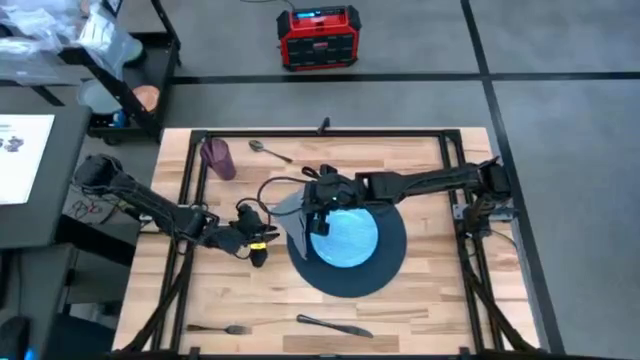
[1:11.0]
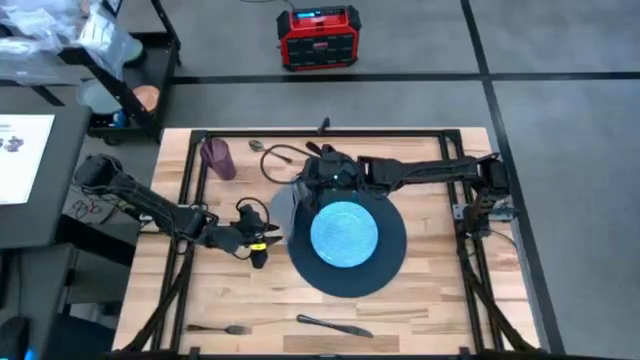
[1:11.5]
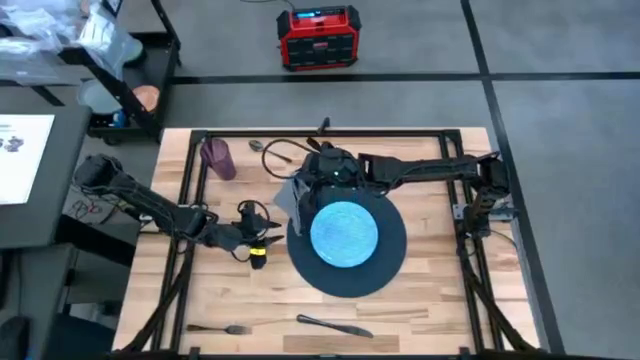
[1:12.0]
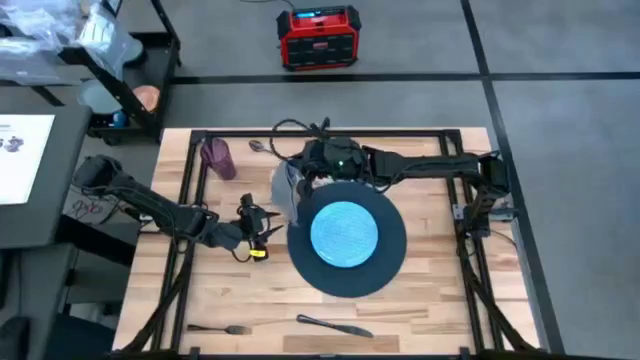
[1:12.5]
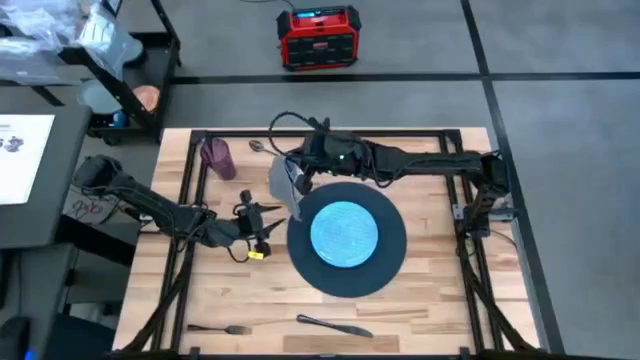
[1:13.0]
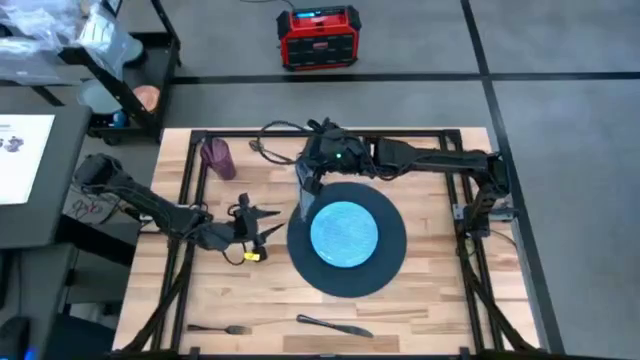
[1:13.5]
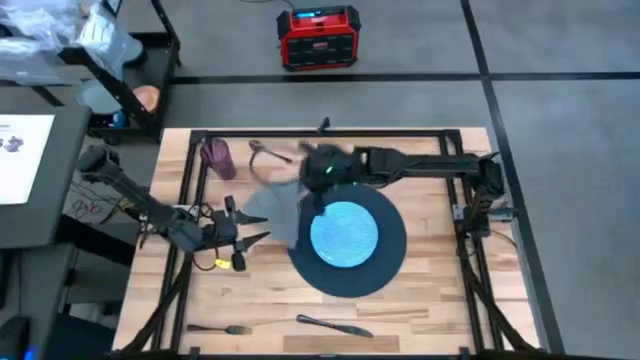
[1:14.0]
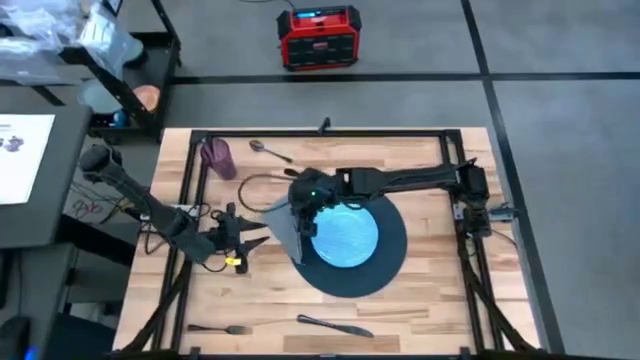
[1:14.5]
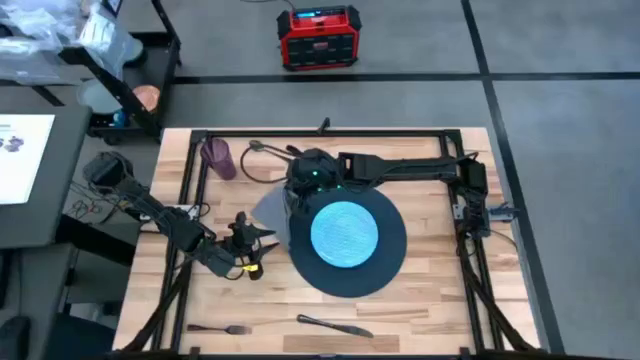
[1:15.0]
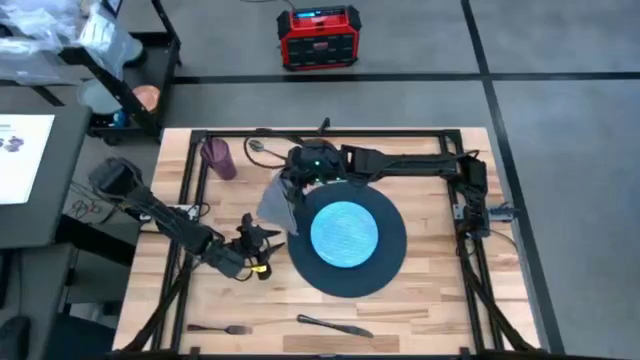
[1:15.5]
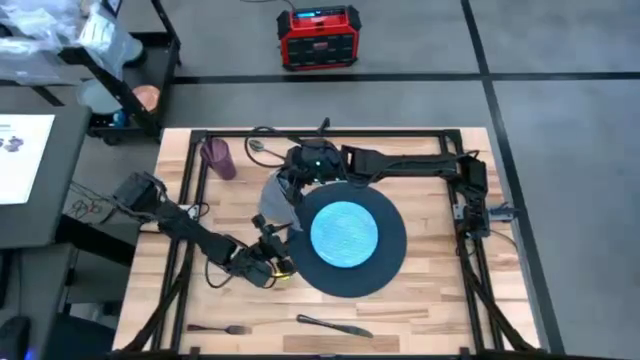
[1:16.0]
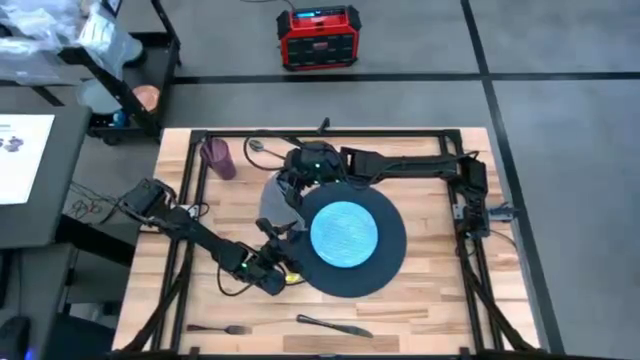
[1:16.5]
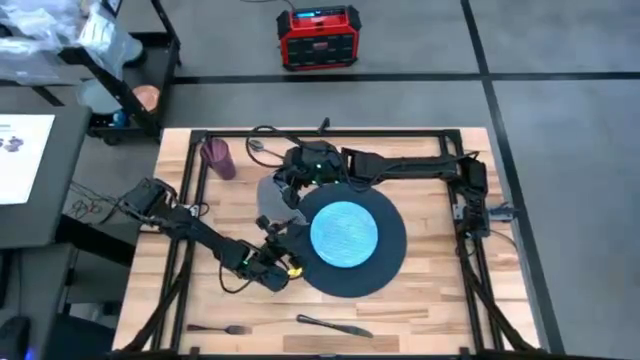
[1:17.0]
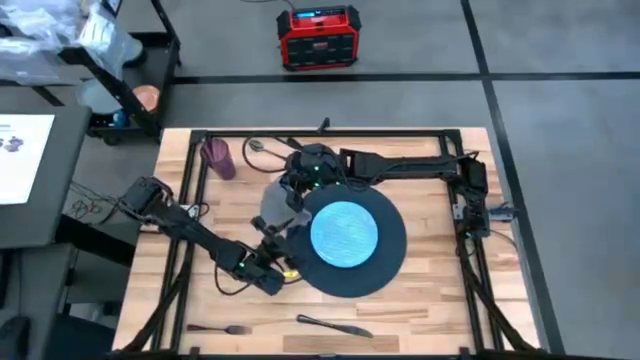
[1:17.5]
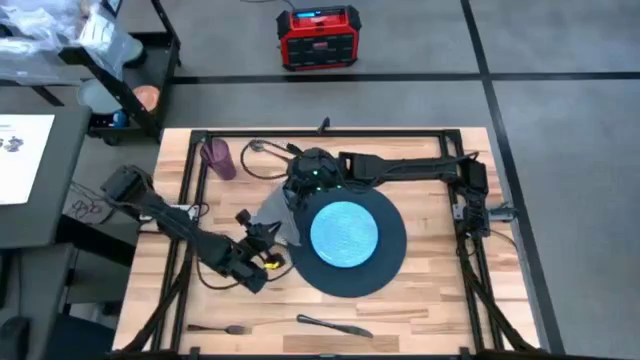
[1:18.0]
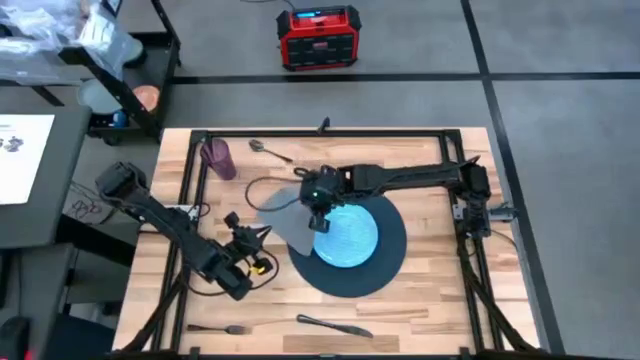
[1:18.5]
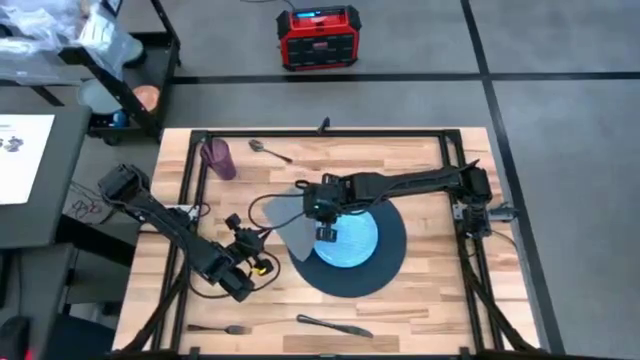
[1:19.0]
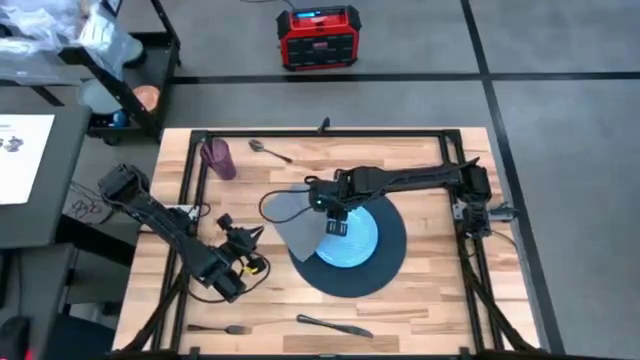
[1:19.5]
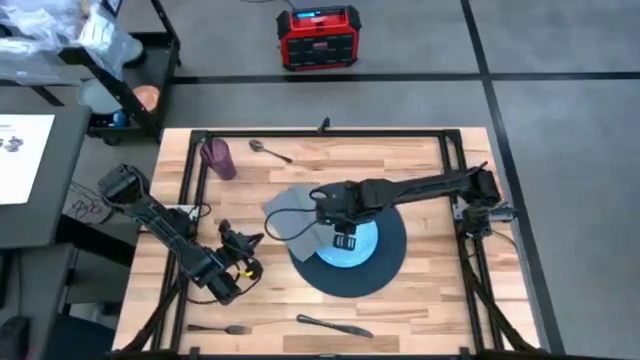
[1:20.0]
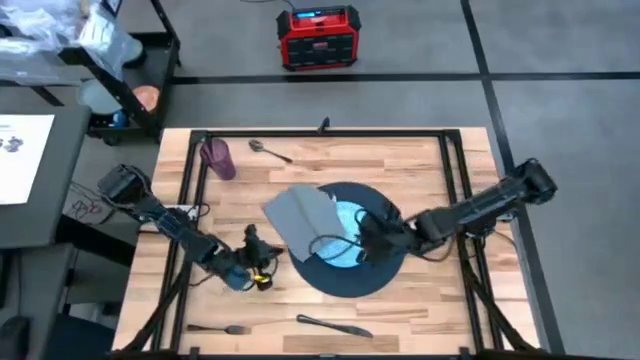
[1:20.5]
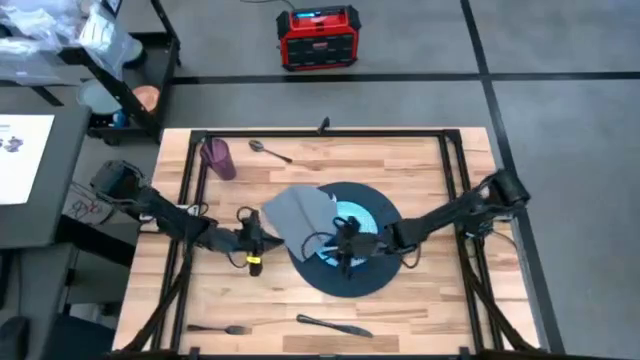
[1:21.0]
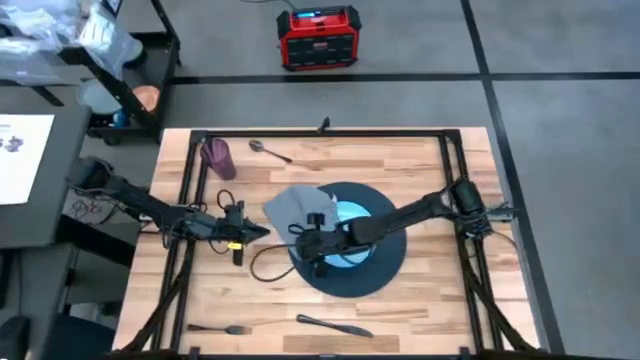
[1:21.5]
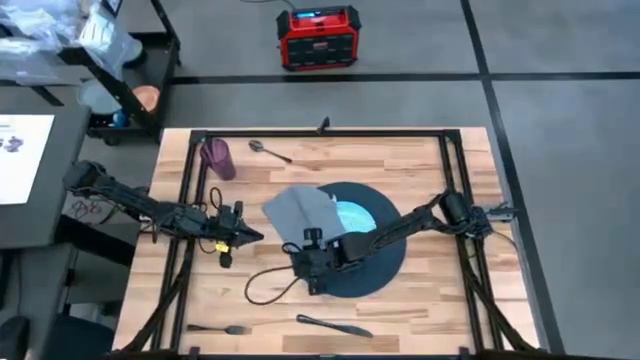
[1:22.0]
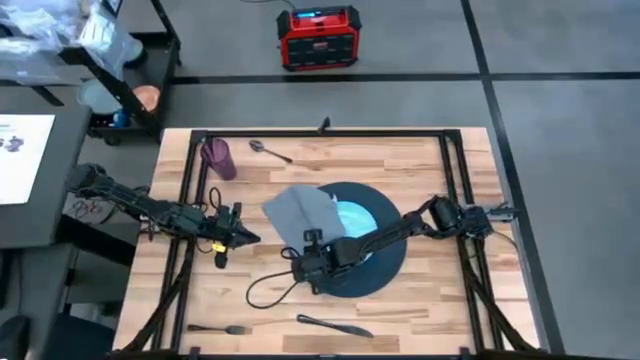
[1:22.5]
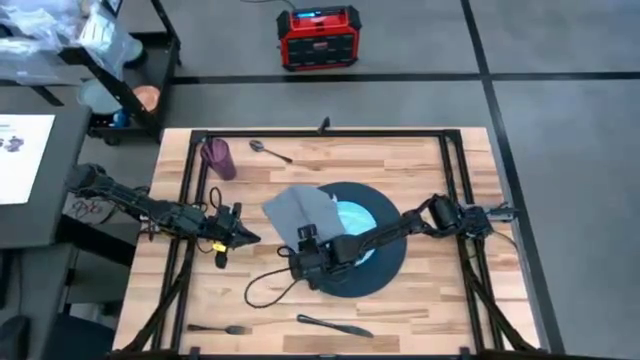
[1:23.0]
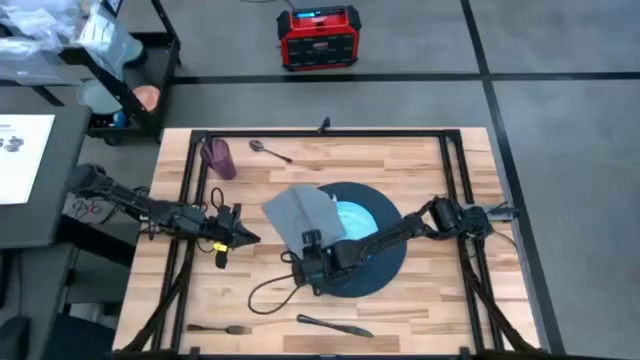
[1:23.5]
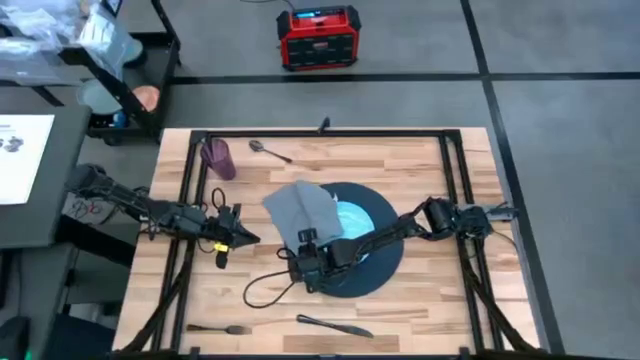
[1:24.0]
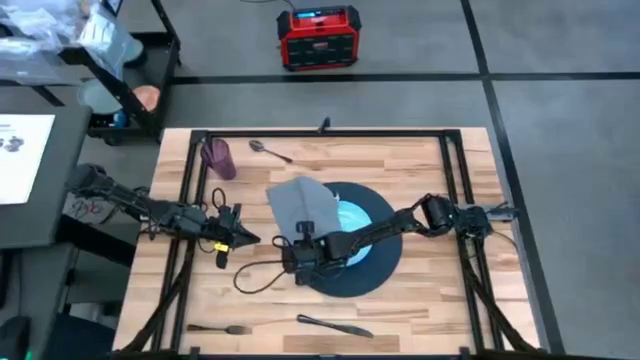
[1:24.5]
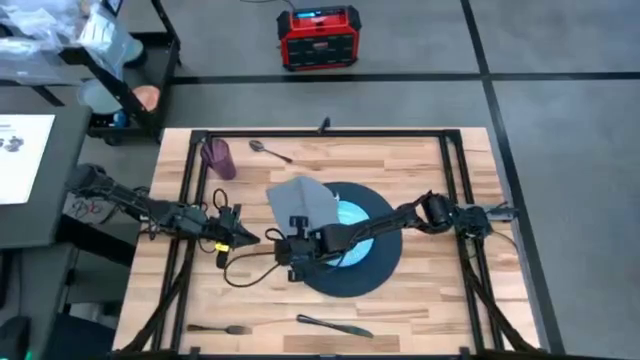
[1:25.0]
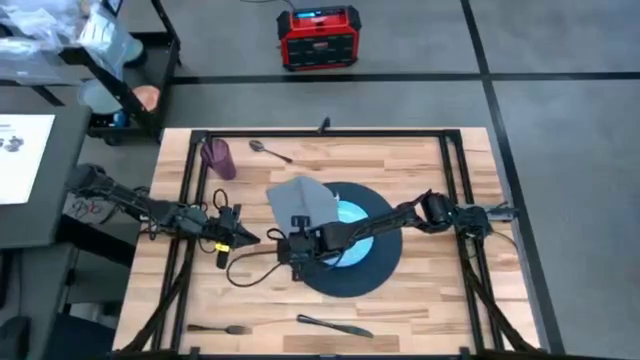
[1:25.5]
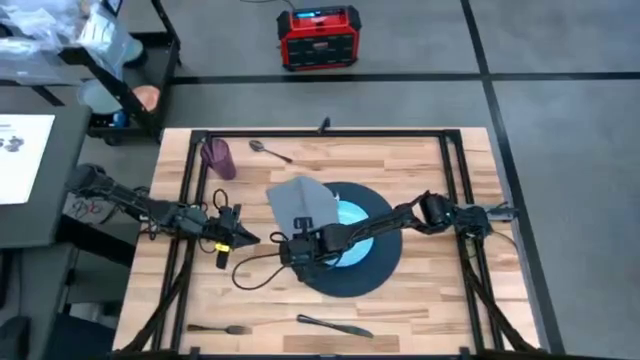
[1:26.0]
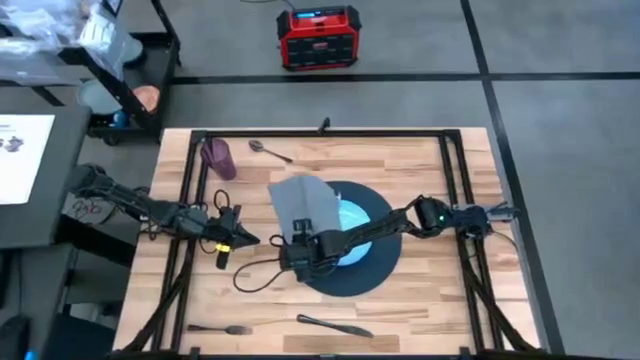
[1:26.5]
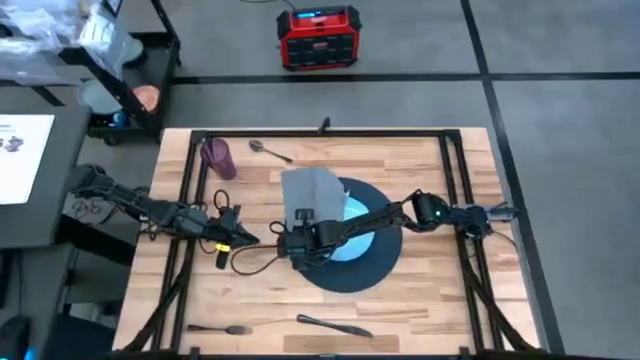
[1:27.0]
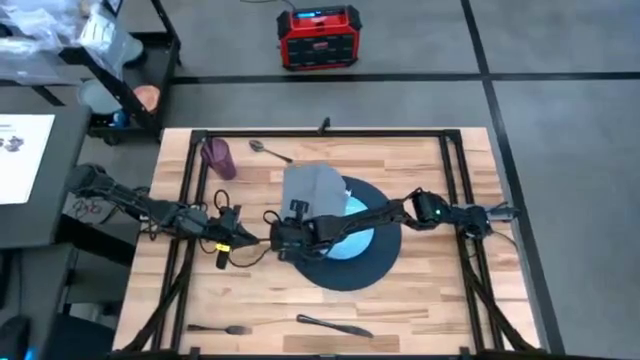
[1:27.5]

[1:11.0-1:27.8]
Task: Set table place
Fold the gray napkin

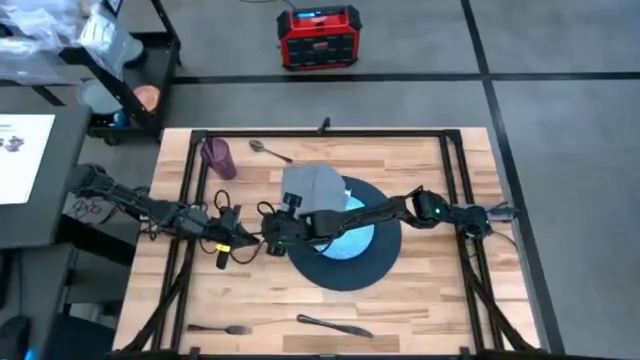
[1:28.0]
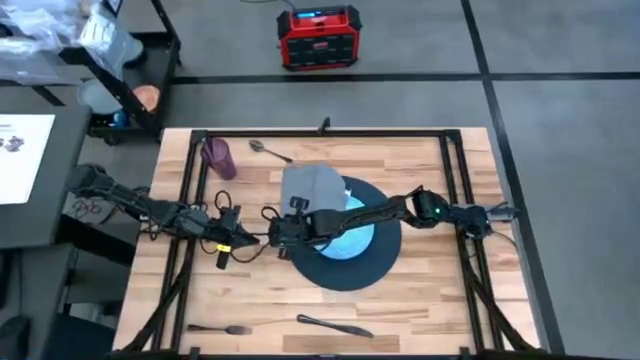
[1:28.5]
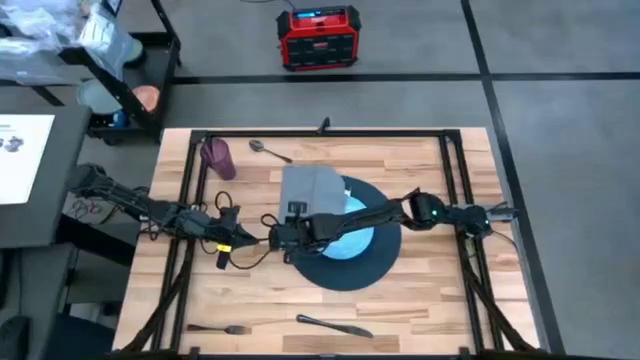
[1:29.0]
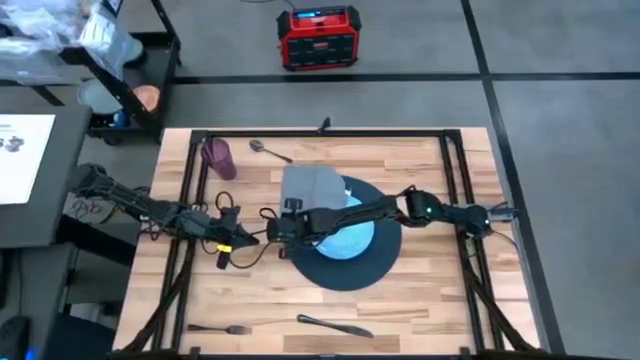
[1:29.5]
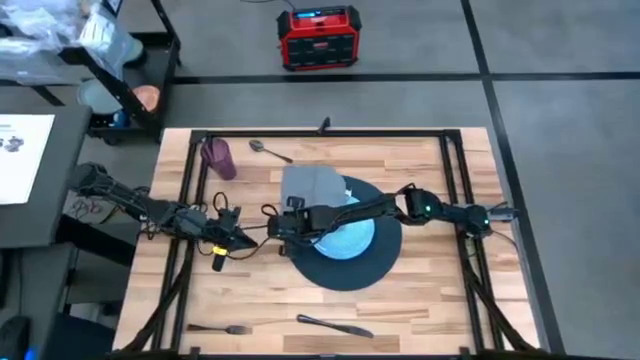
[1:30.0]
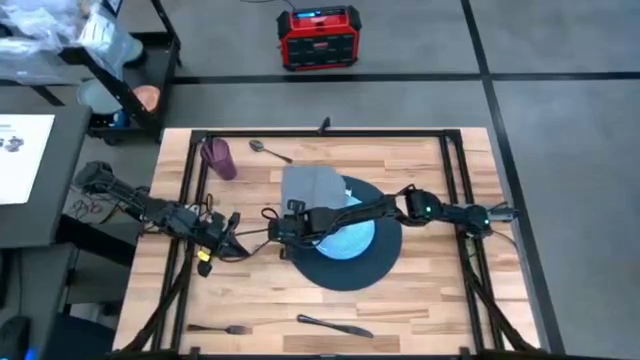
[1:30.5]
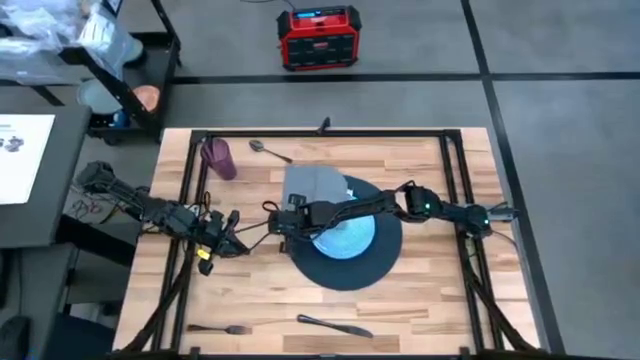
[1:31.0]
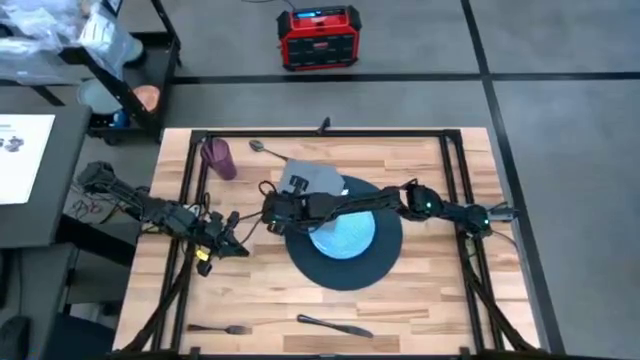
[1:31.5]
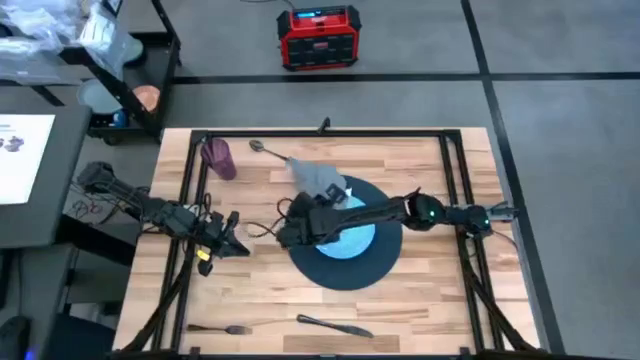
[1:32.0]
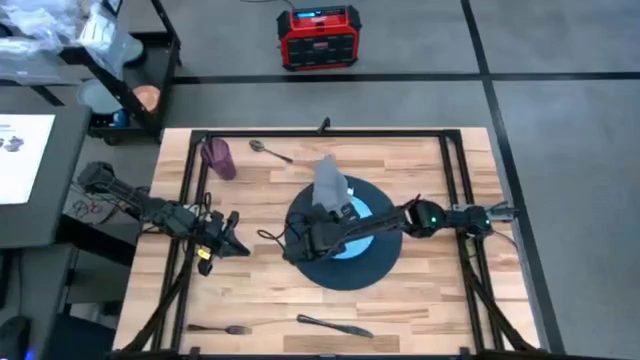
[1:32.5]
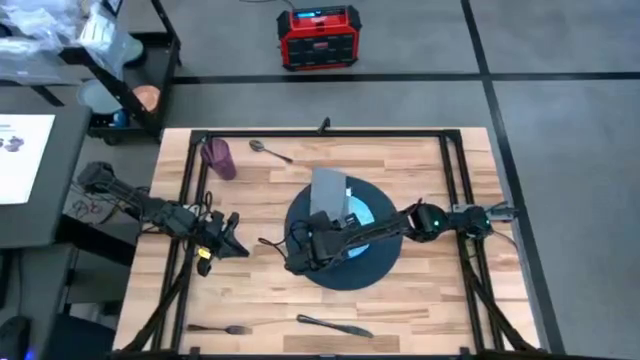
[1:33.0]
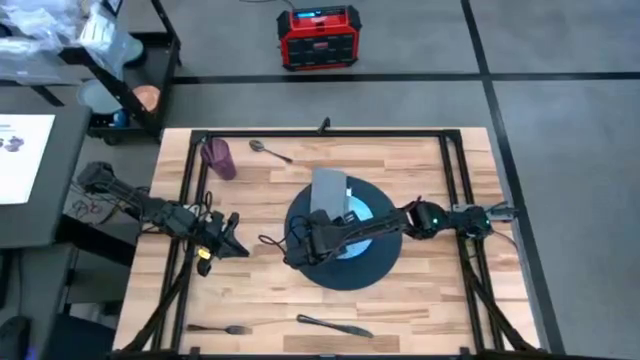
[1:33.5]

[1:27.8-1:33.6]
Fold the gray napkin
